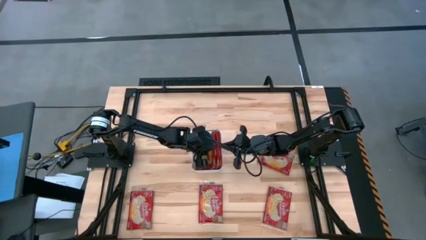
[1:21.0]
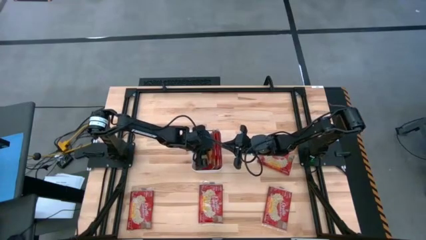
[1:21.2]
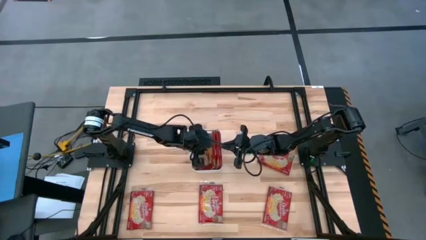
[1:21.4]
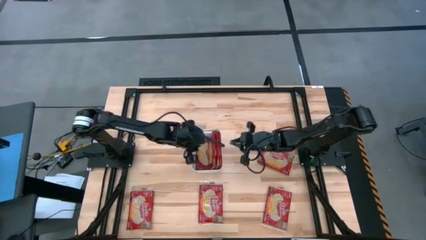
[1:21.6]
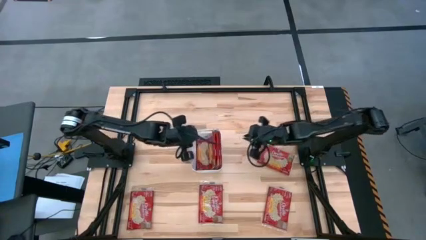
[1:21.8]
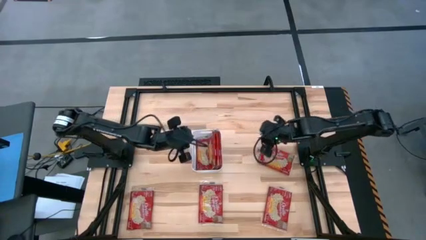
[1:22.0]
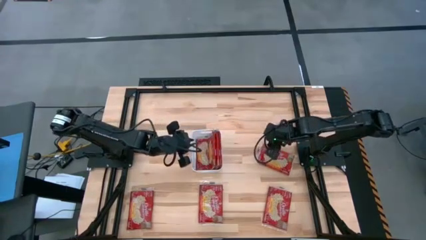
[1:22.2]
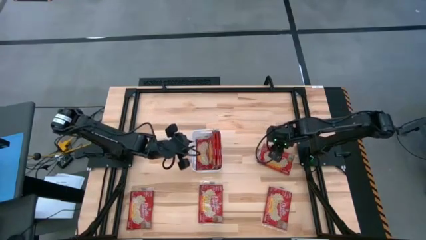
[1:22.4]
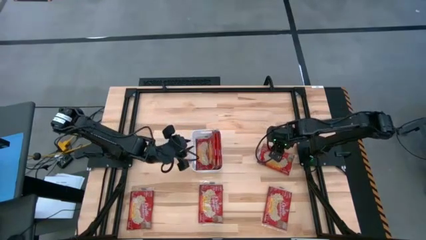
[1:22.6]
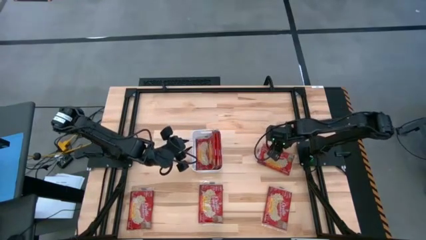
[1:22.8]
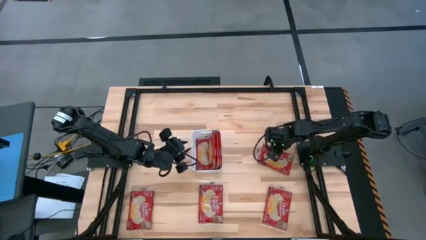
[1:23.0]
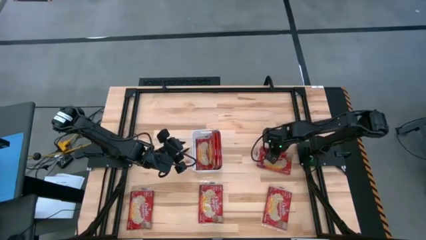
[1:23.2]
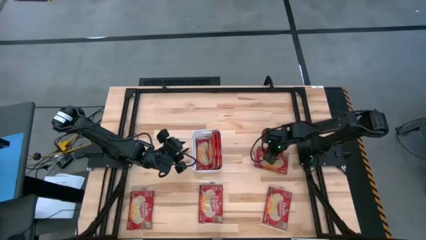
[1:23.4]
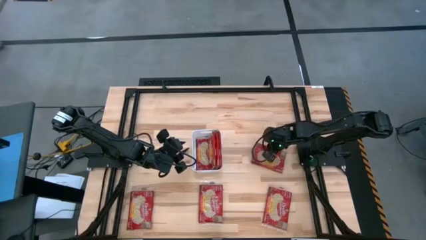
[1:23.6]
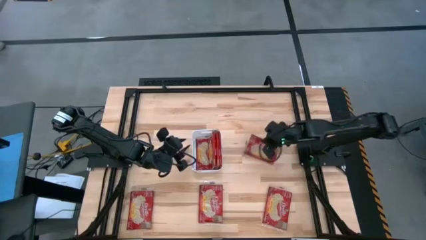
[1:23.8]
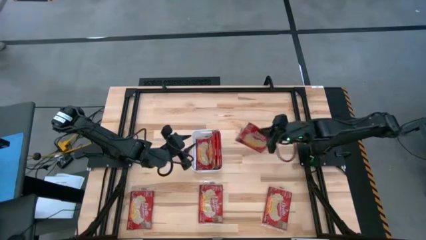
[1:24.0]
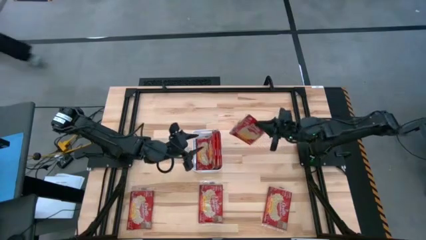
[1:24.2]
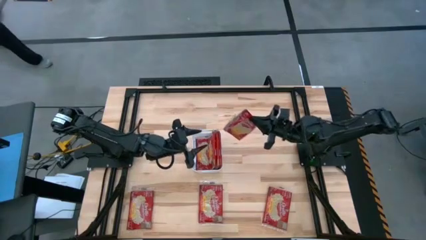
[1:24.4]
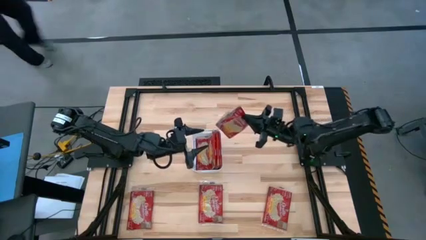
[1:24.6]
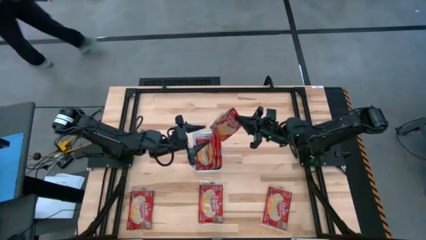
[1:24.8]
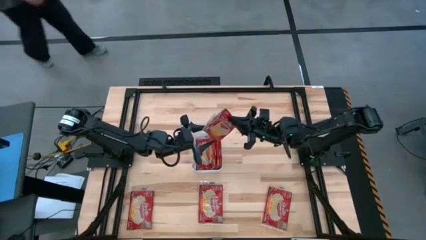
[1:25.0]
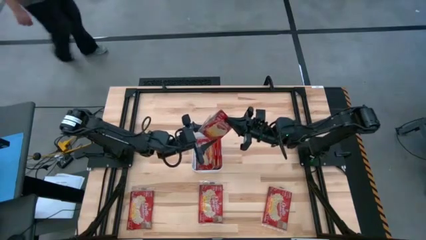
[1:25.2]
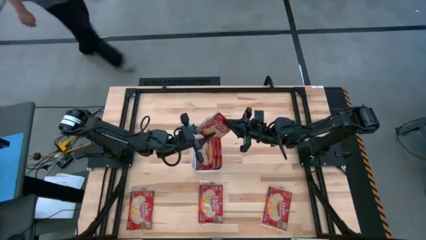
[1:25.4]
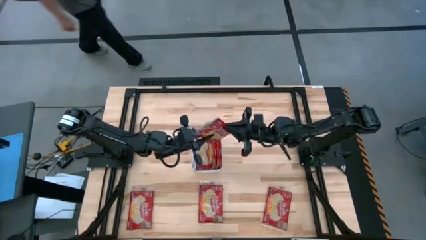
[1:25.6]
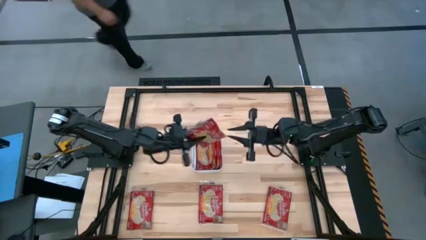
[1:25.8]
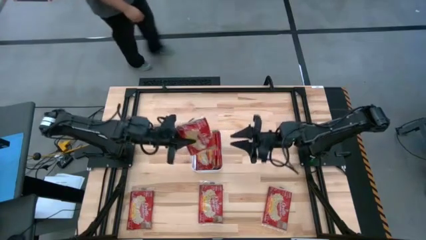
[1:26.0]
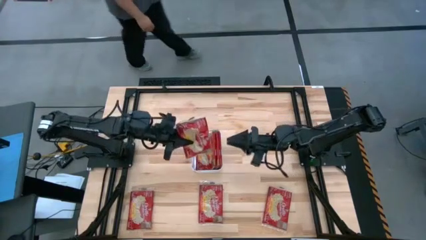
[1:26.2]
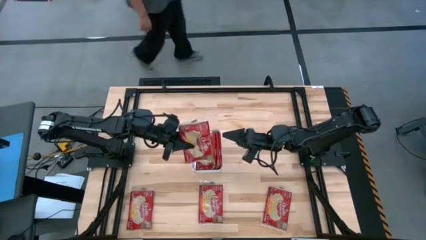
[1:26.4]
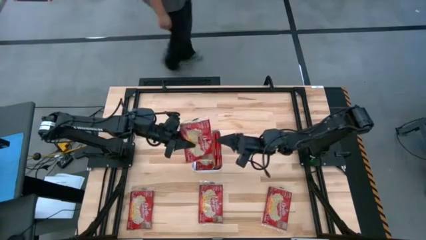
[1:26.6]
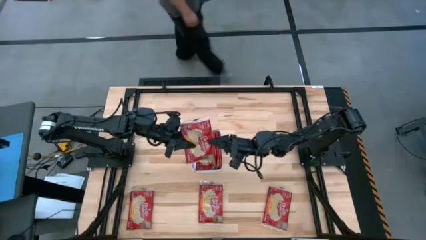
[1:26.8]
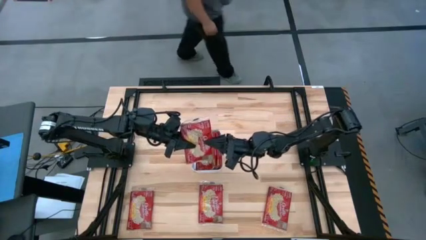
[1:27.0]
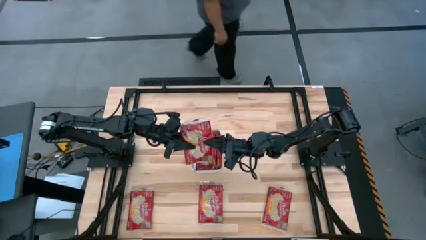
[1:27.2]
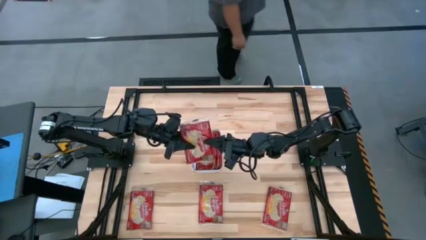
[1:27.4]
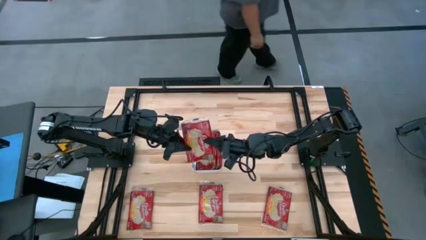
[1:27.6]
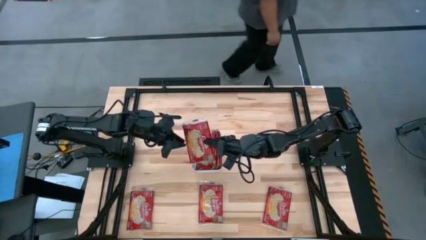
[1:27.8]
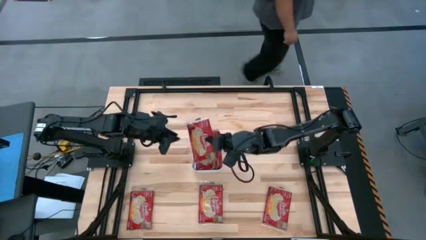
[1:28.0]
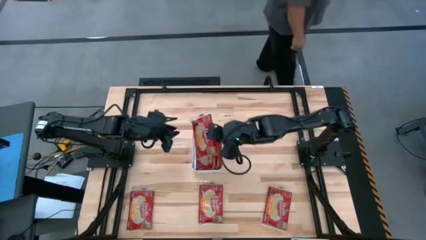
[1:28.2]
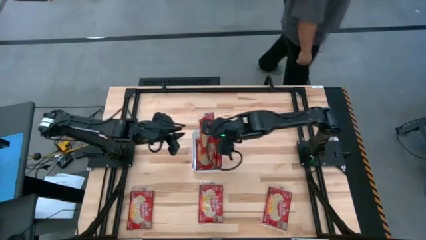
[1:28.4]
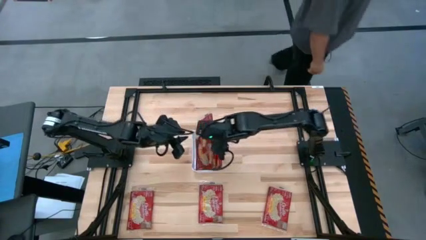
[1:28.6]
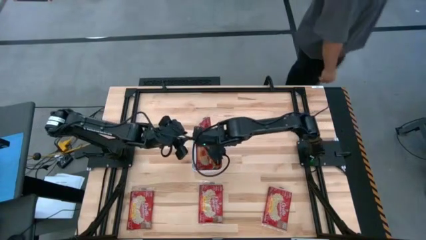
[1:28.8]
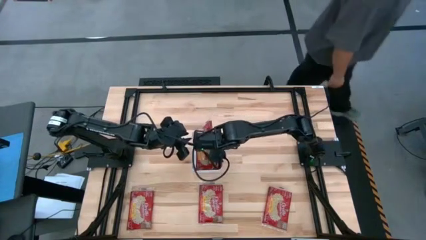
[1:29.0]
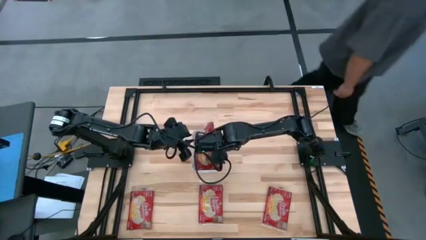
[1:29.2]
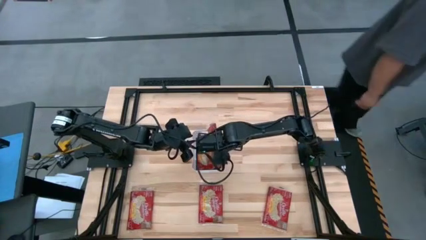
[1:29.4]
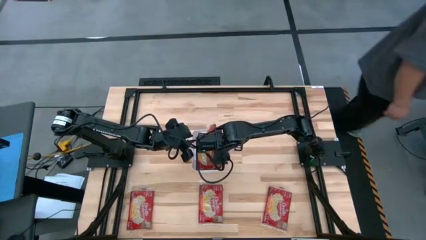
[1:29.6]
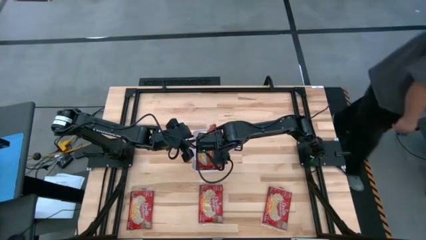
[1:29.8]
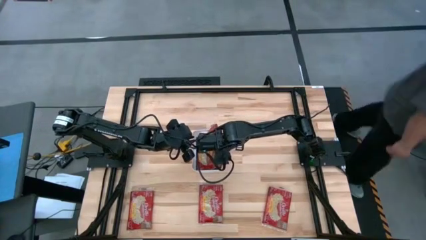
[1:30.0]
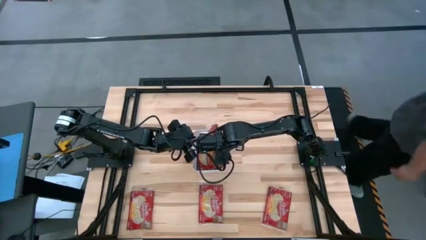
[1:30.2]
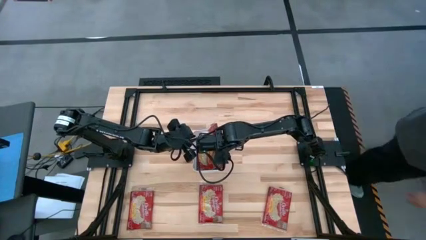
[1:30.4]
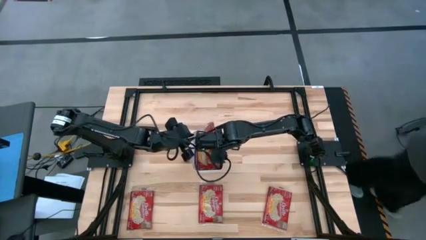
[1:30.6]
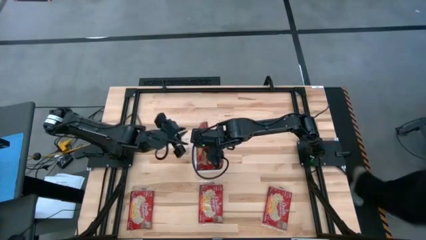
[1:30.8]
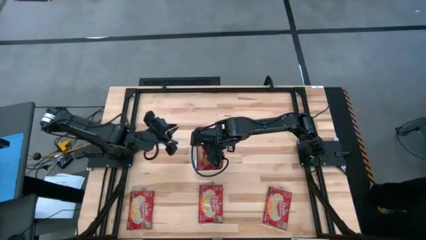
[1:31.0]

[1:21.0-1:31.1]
Task: Sort popcorn bags into baskets
Put the red popcorn bag into the white bin

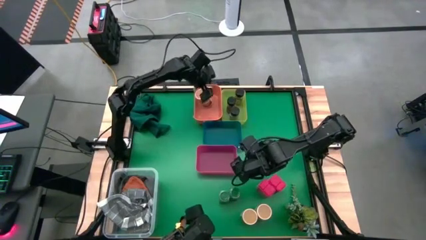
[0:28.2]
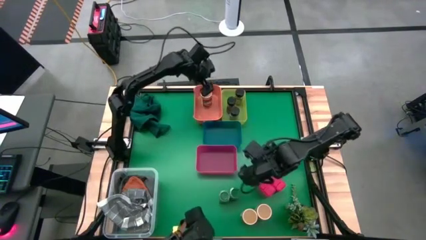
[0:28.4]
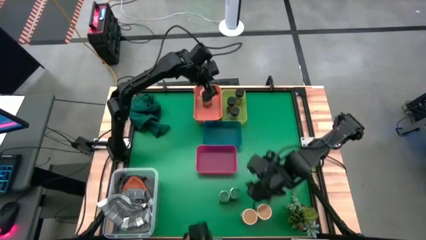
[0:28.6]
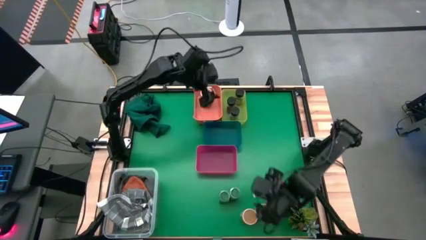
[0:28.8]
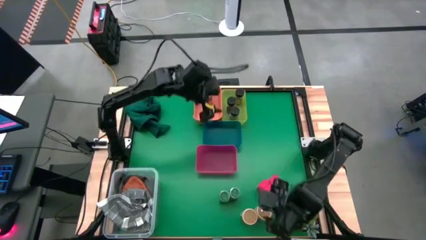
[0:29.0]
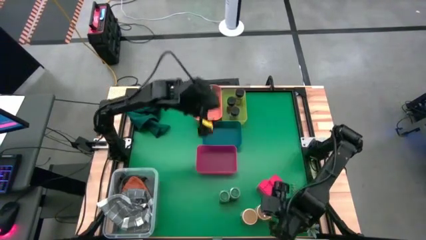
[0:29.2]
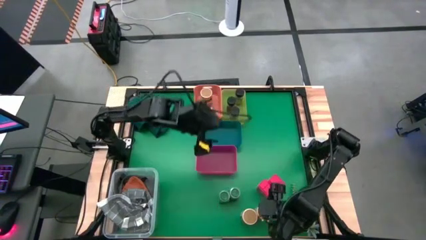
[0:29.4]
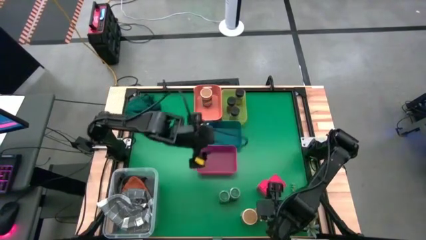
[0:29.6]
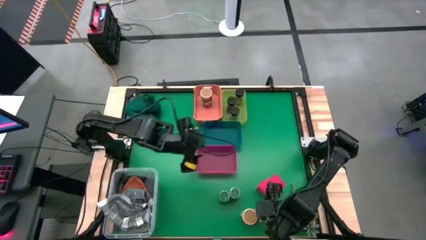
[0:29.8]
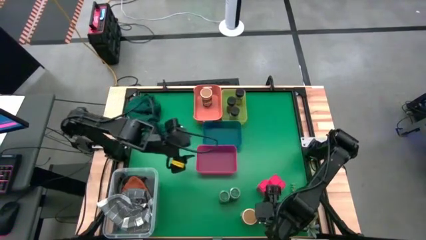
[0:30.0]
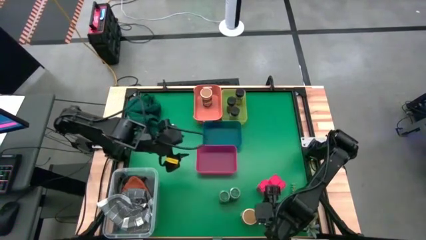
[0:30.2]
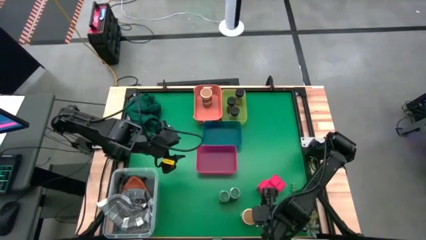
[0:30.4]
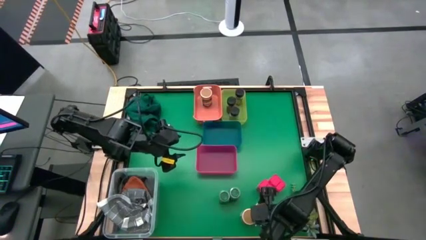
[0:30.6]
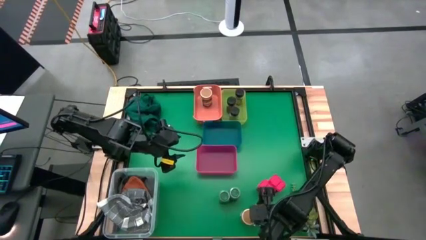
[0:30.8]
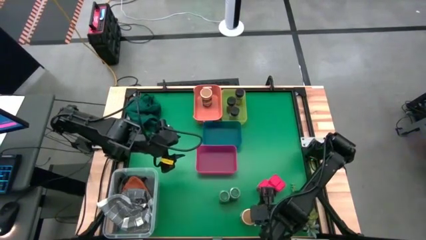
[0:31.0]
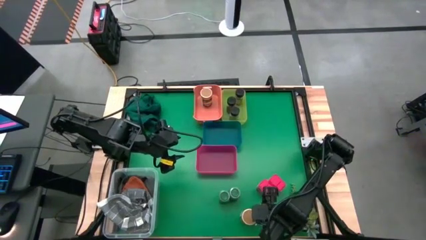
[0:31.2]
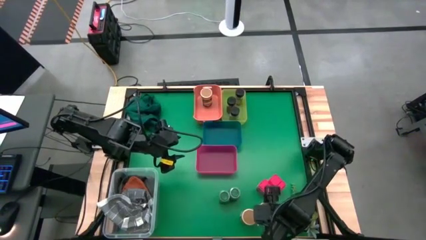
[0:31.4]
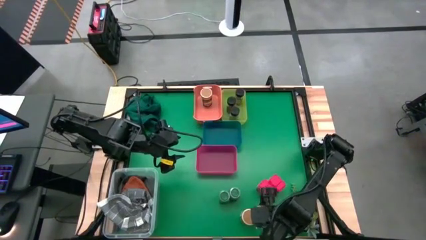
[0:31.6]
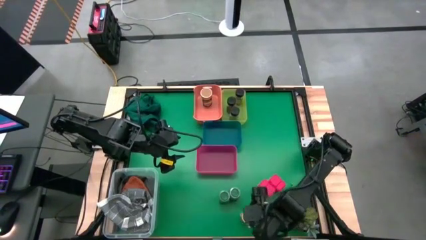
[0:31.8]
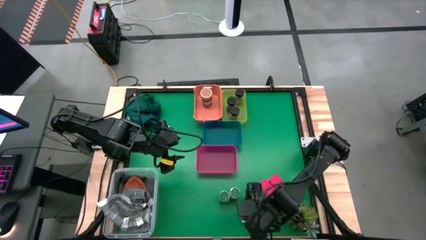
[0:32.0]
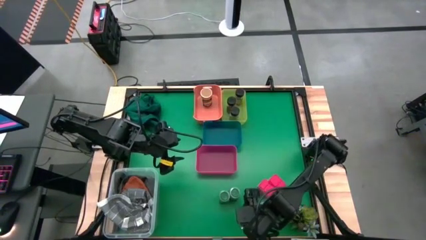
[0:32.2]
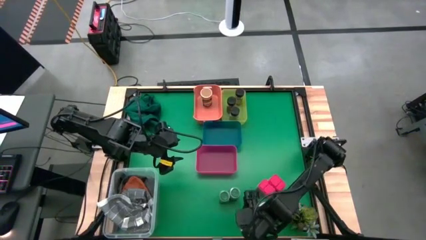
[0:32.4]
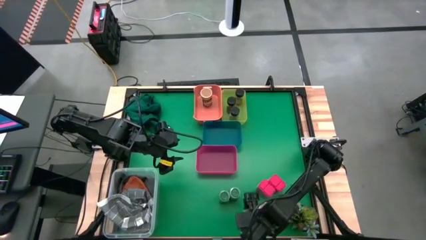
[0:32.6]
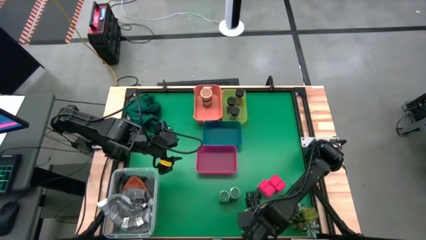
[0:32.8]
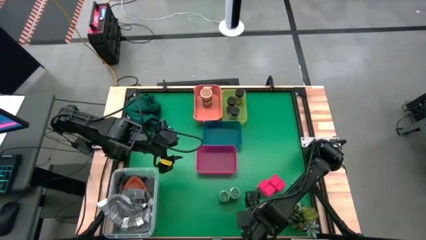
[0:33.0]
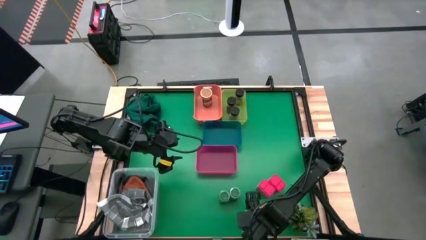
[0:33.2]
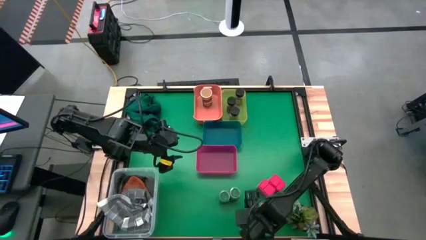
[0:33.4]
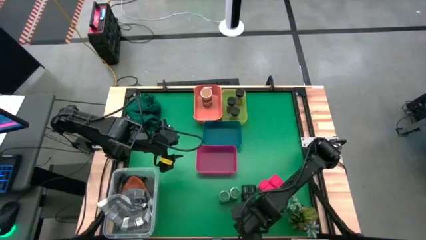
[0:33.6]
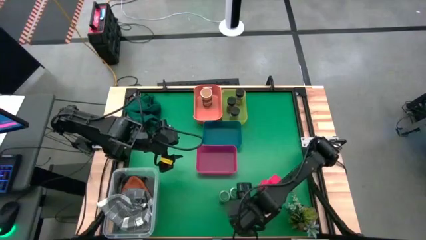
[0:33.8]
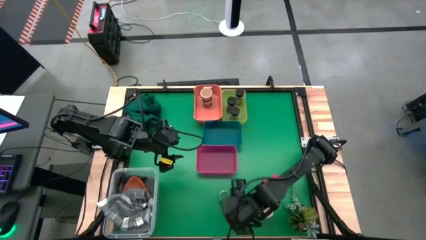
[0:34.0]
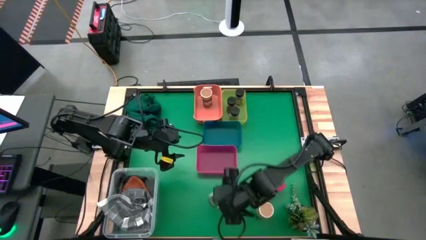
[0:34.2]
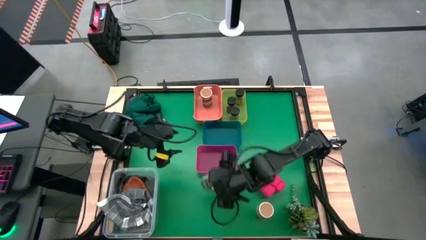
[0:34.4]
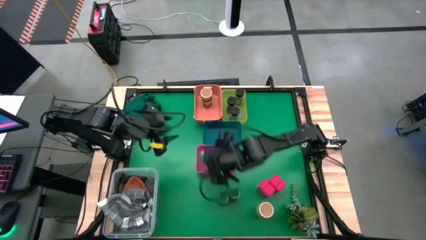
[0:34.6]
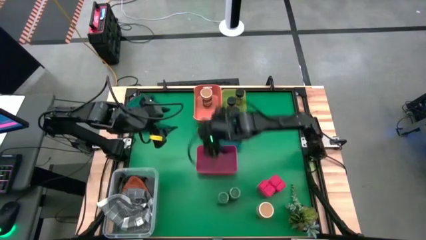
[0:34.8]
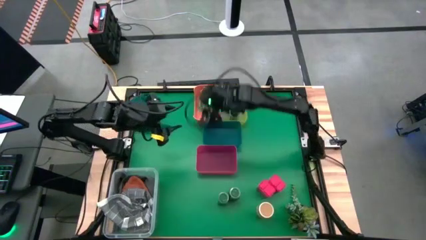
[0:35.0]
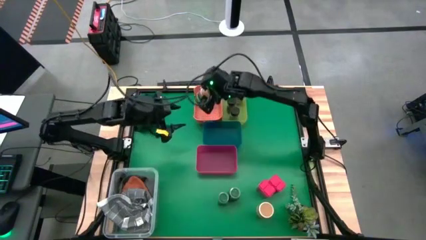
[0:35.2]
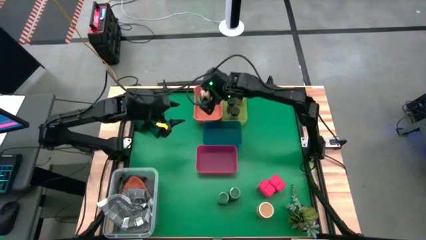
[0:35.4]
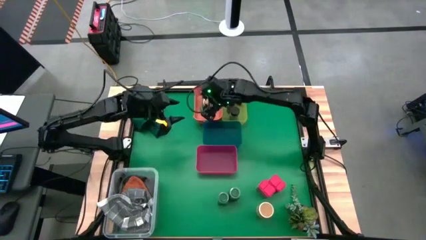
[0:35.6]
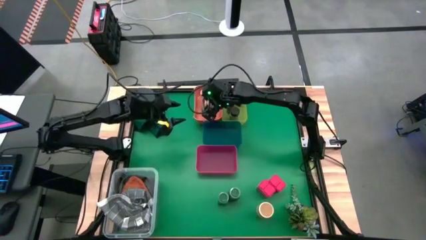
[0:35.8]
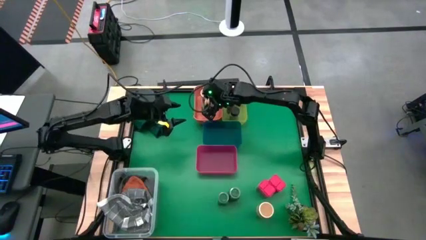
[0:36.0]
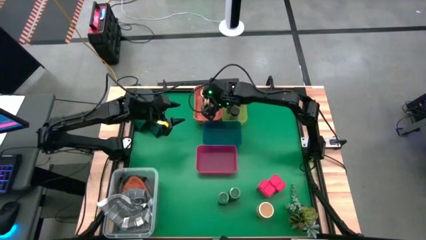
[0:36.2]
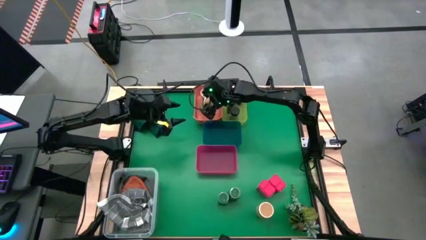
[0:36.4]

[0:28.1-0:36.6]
Task: Sort spices by type
Put the left gold seasoning bottle into the orange bin
